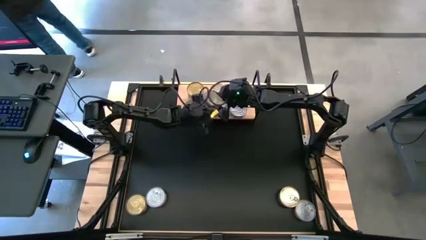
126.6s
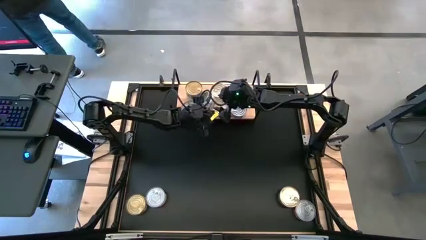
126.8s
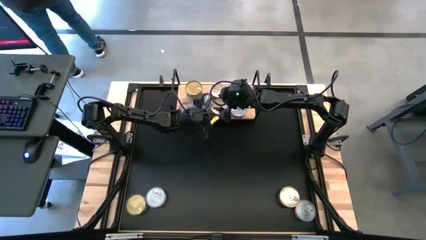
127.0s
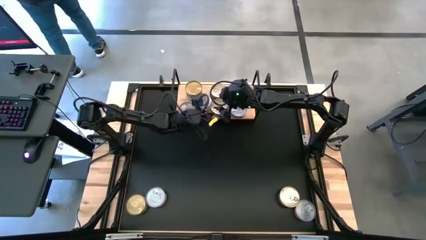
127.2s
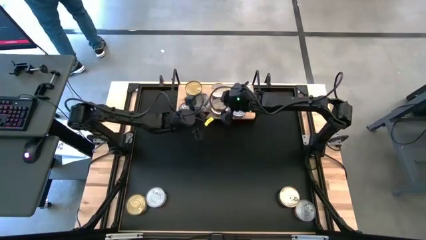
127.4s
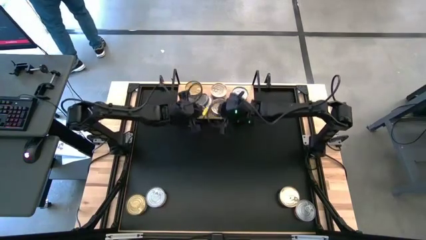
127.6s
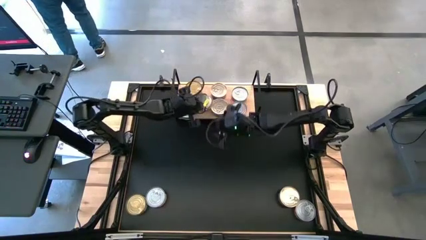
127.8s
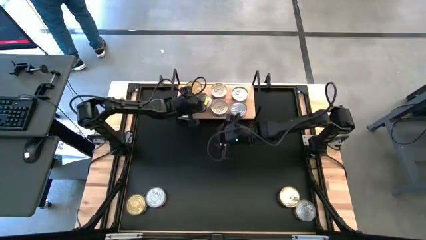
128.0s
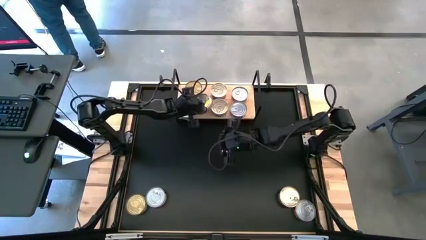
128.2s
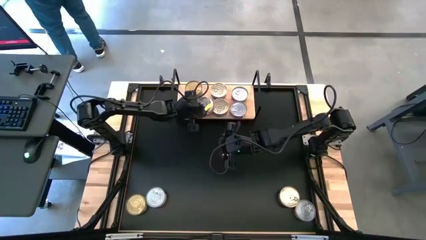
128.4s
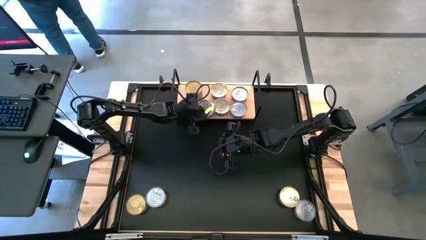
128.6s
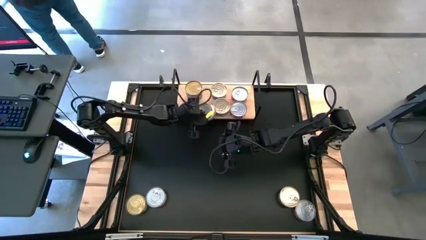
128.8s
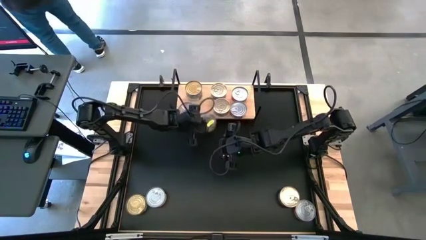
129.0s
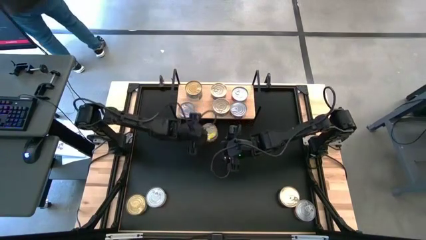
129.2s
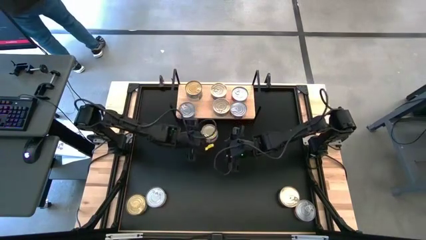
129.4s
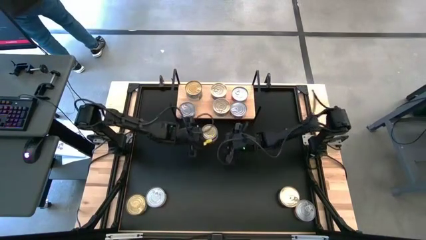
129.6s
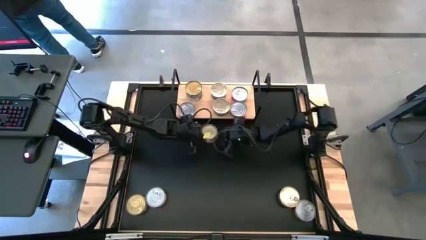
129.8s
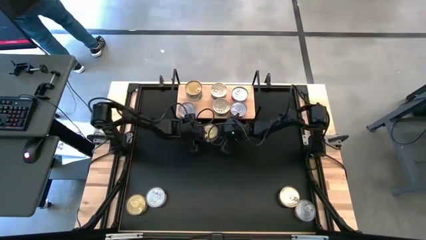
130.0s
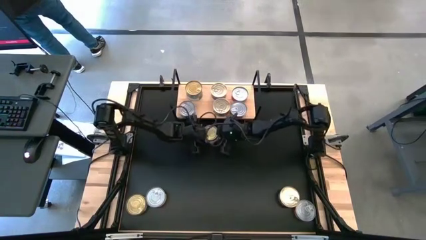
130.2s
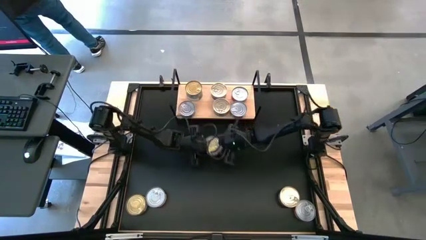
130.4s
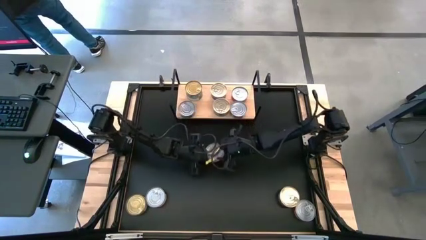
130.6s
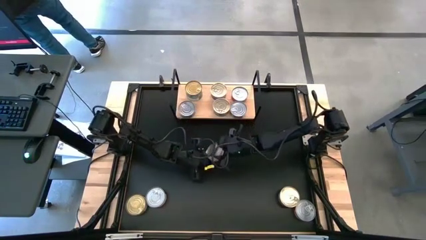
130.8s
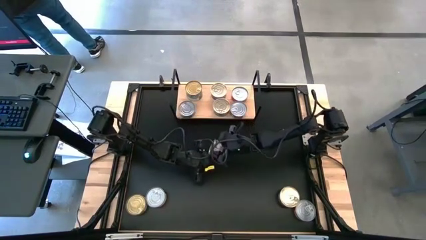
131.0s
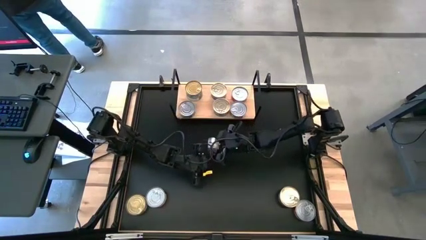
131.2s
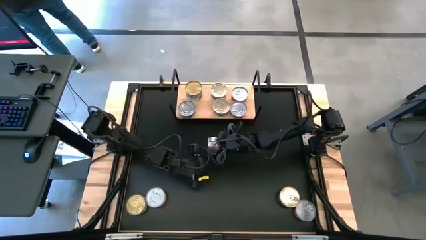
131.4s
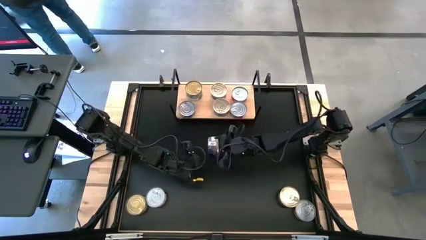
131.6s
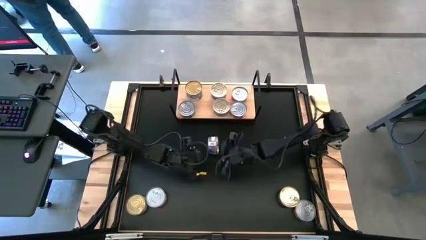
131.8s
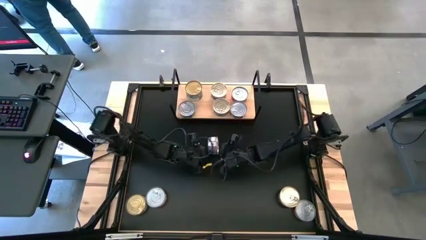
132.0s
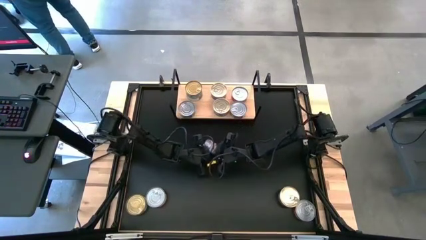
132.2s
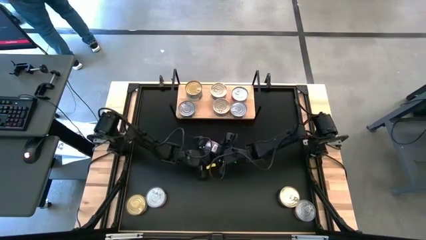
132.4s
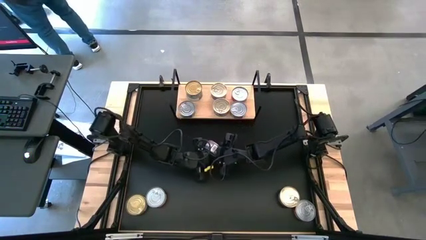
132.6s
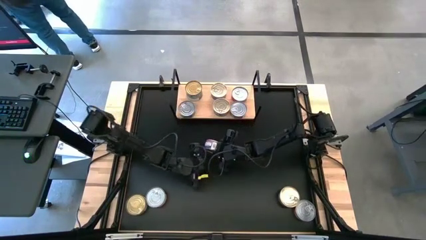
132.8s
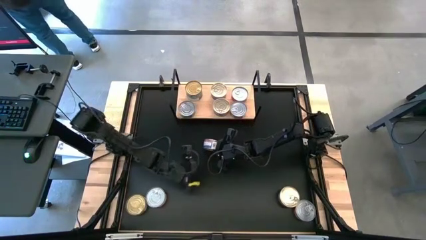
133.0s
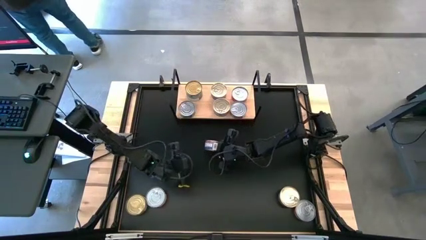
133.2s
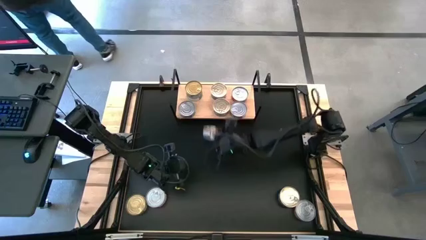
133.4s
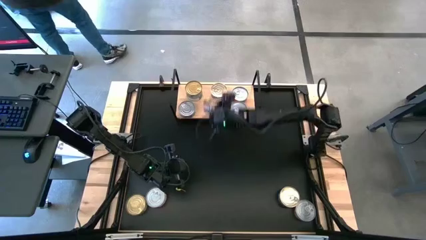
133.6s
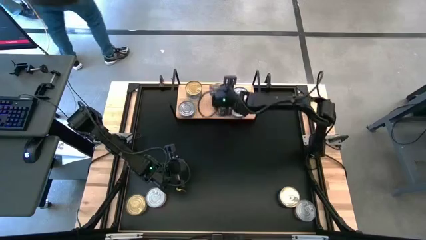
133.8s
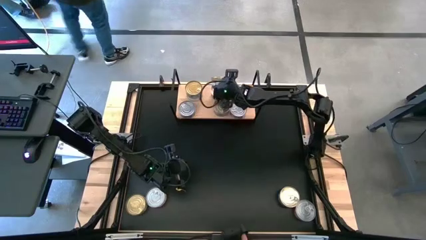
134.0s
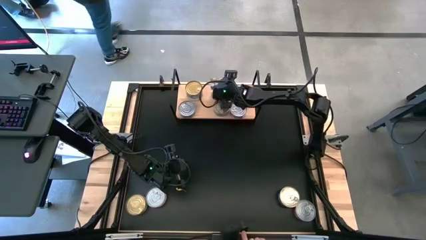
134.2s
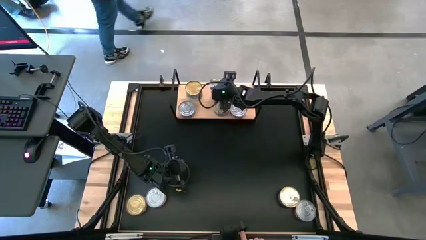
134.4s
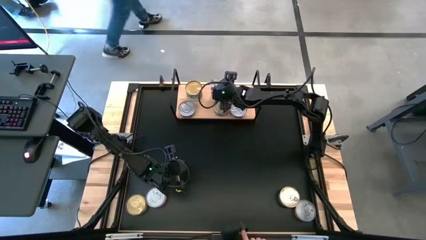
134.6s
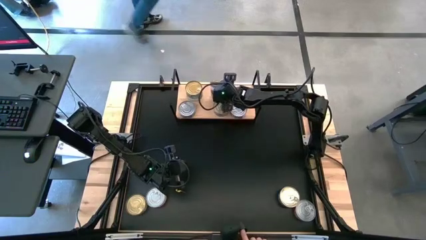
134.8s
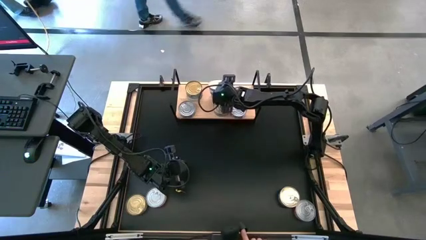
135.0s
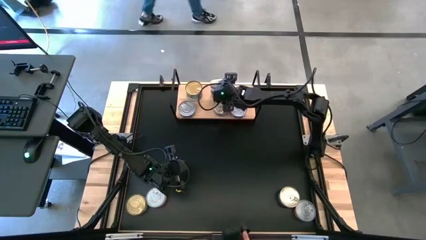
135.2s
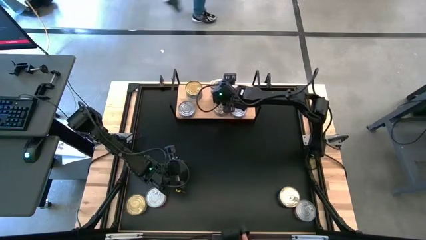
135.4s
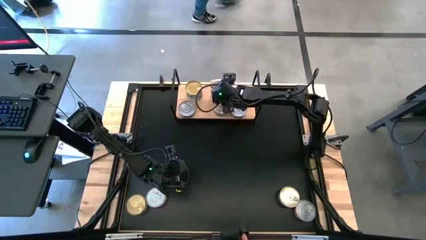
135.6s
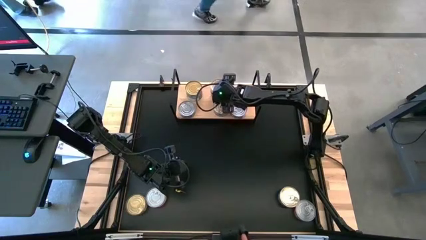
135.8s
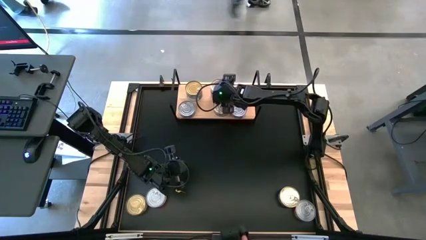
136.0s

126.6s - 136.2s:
Task: Stack canned seafood by type on shelf
Stack the blue-pink tuna can on top of other blue-pink tuna can on the shelf

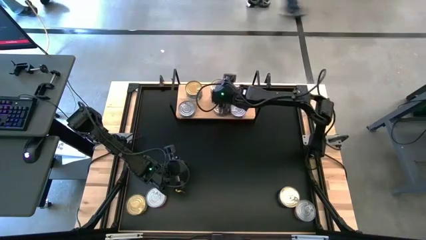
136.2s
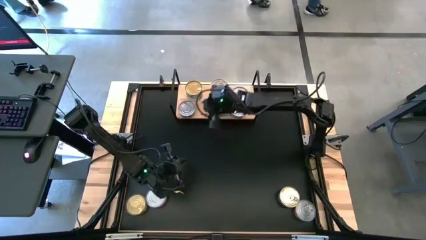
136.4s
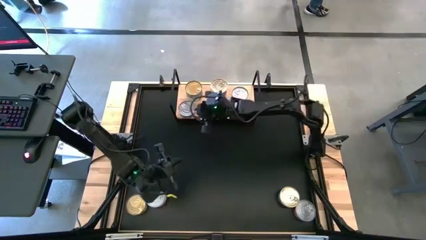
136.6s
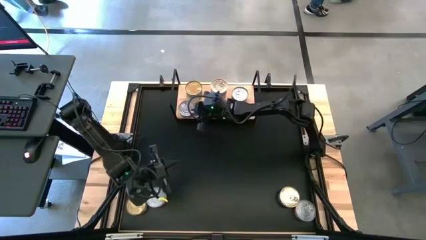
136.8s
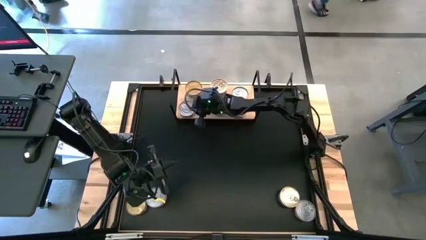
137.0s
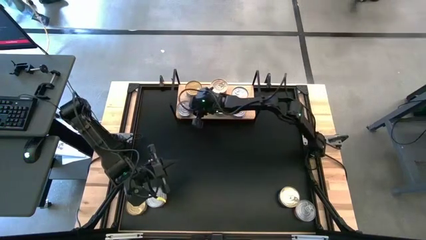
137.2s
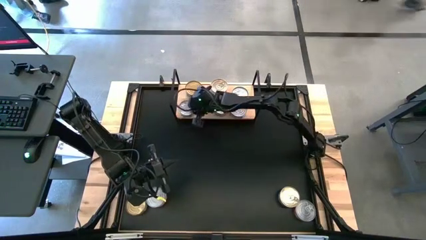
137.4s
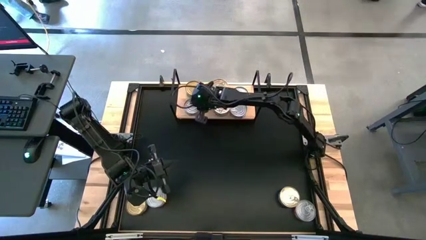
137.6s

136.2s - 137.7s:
Adjust the green tuna can on the shelf

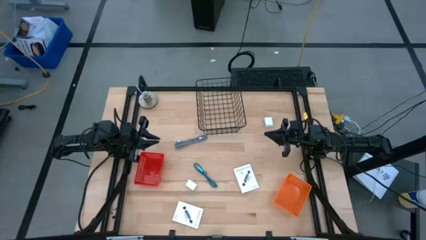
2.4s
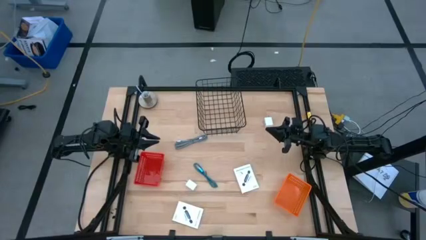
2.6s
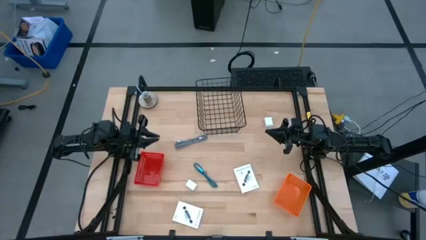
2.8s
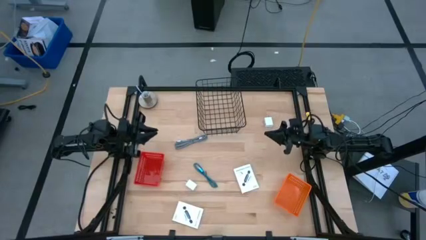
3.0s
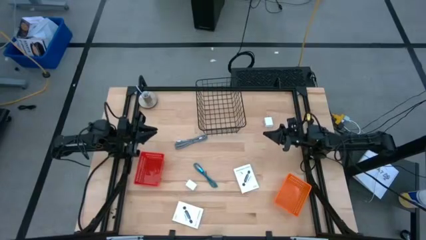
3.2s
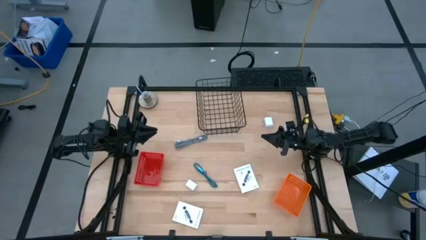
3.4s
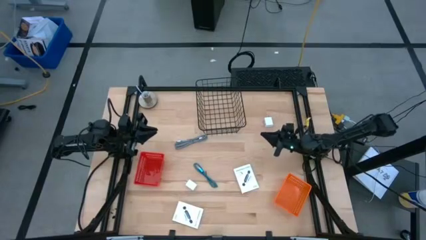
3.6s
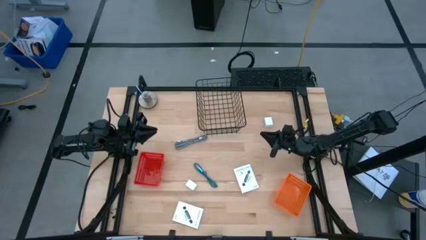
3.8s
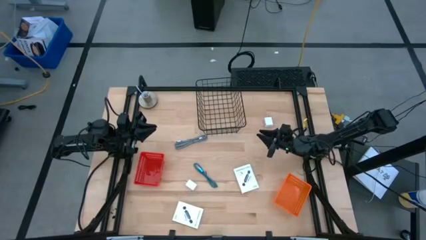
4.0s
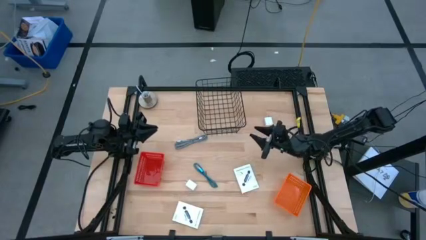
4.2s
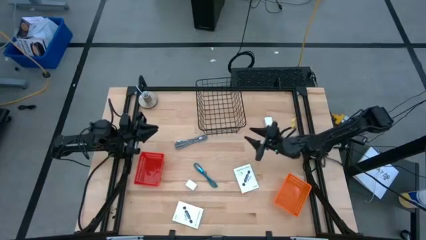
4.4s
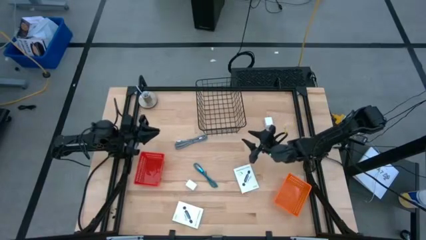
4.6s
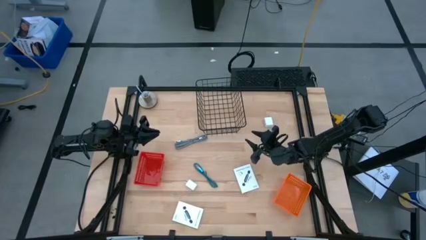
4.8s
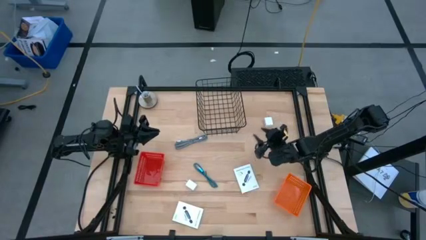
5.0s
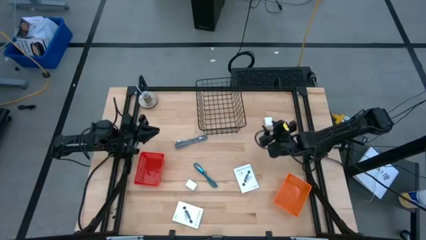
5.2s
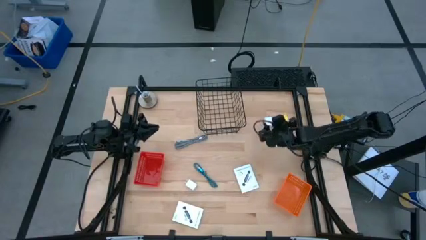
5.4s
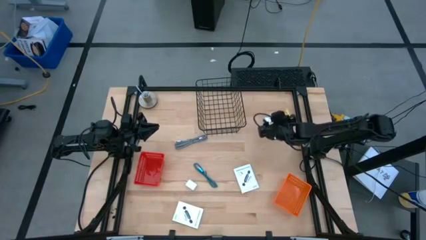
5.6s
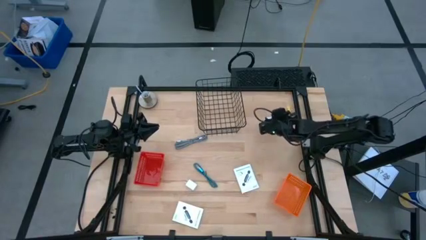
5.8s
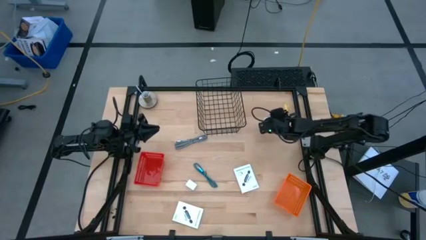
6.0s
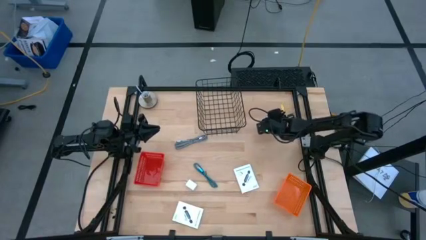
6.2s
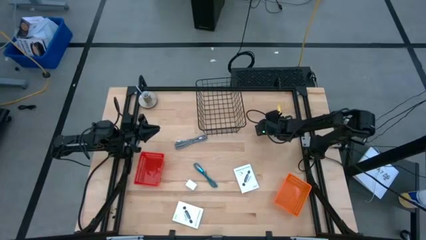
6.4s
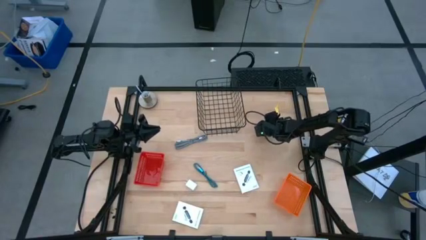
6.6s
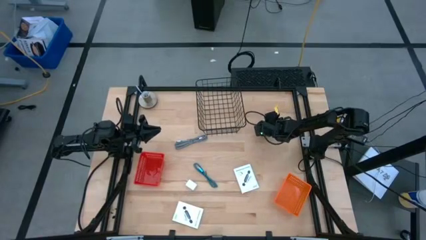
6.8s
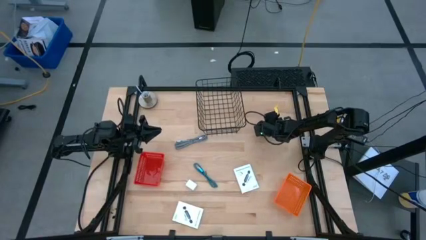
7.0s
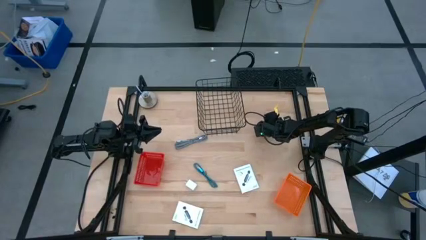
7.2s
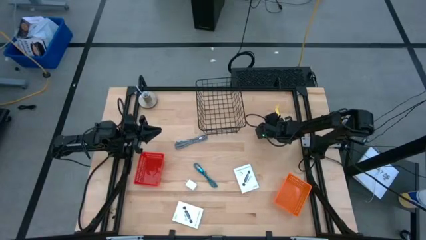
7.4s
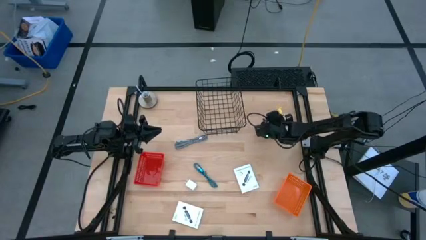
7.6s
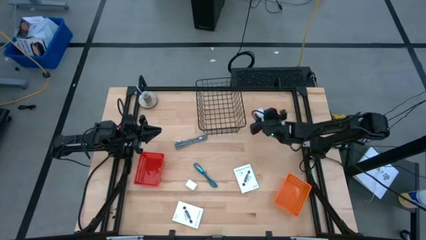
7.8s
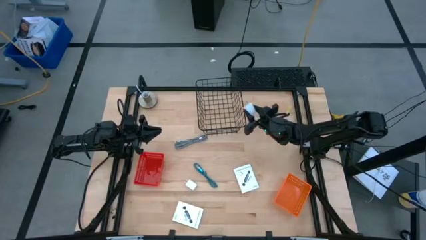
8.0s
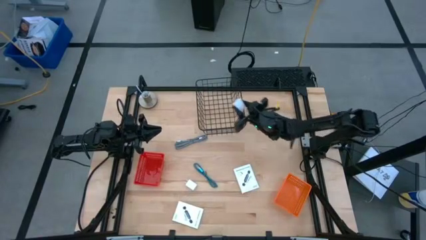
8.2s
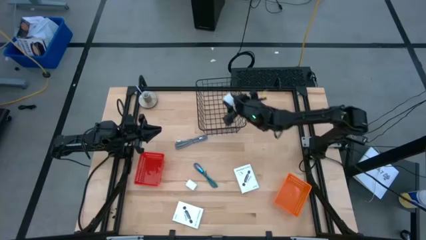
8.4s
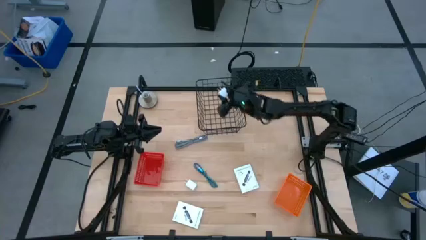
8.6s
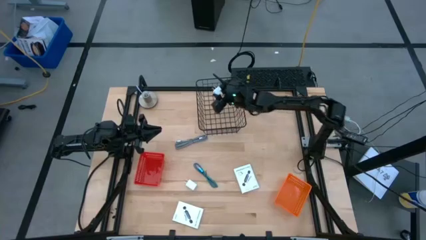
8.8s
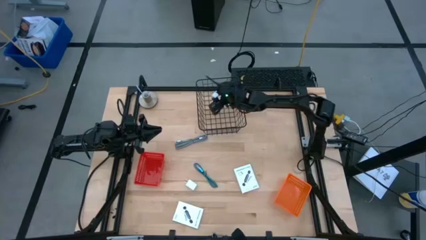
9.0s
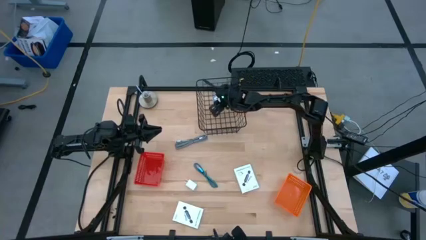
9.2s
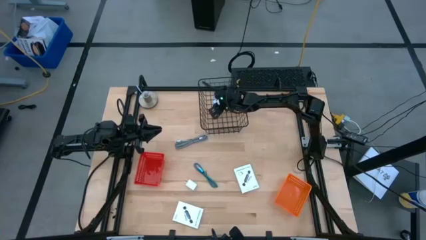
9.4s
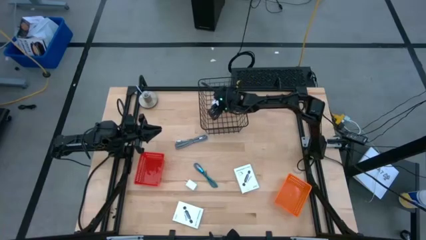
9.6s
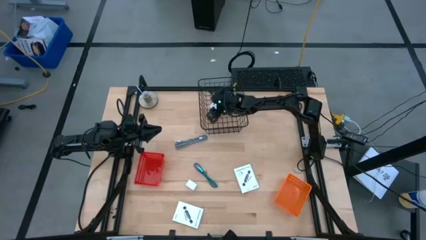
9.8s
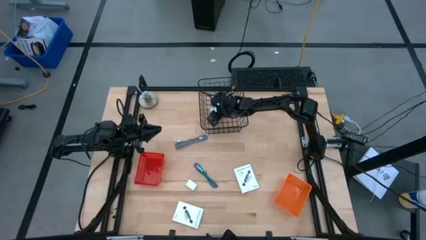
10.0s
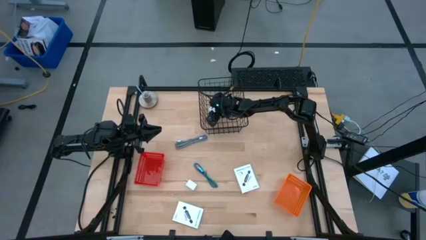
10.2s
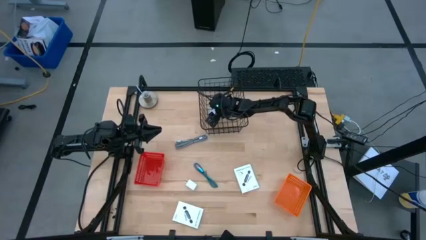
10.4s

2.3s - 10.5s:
Task: Pick and place items into bin
Put the top white charger adapter into the black wire basket
